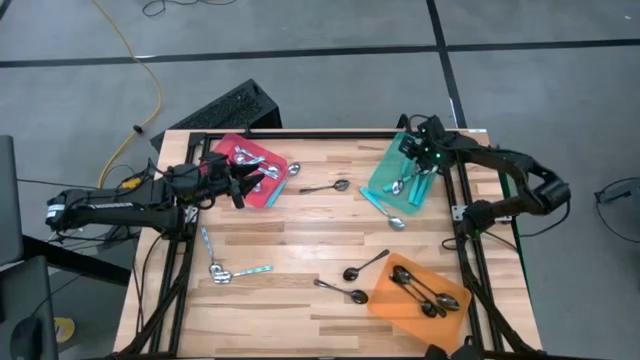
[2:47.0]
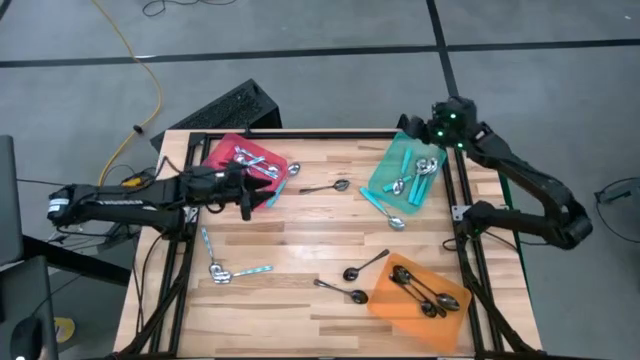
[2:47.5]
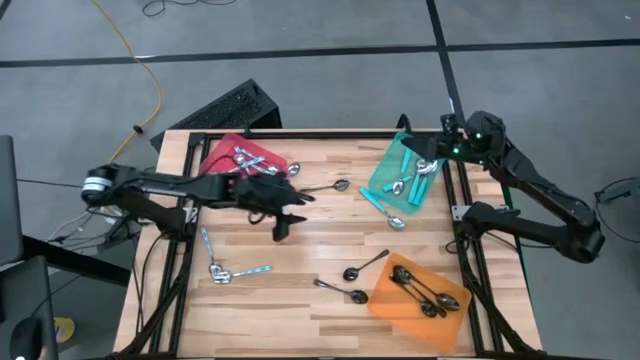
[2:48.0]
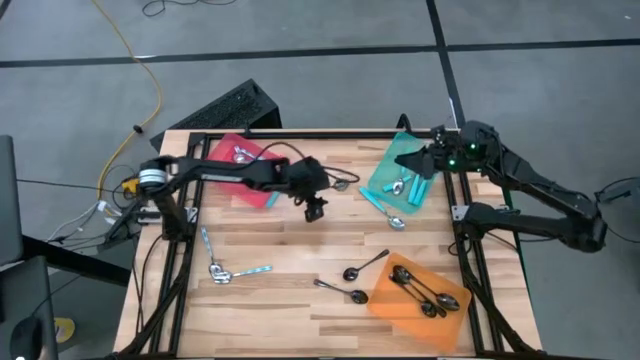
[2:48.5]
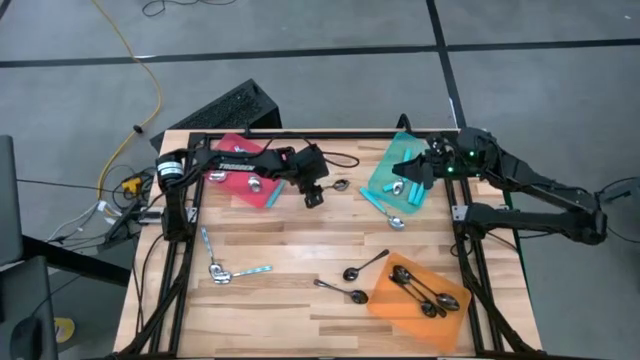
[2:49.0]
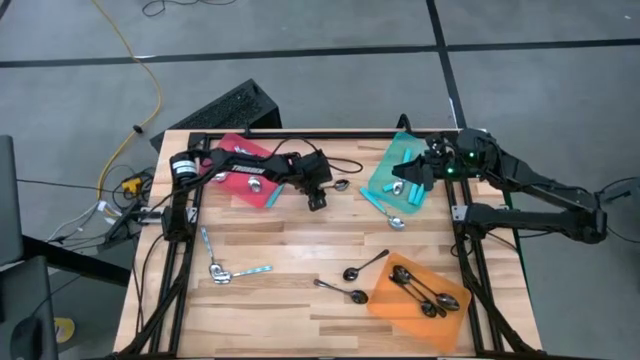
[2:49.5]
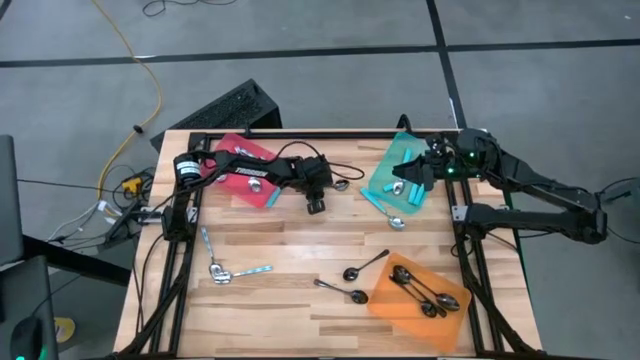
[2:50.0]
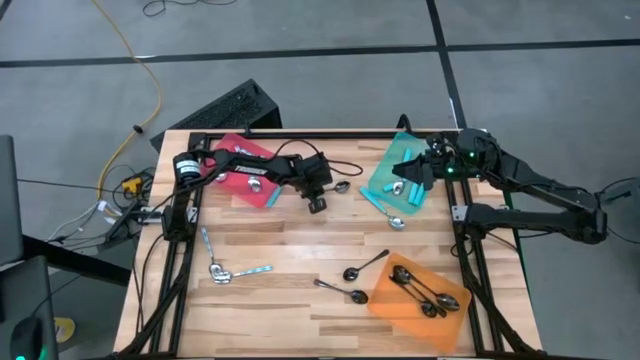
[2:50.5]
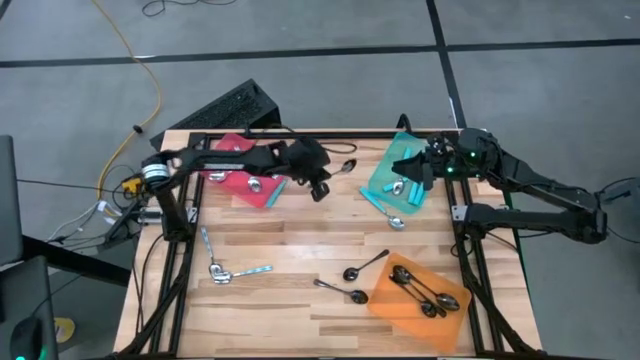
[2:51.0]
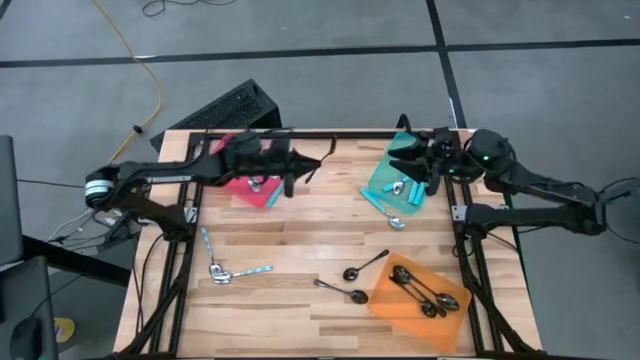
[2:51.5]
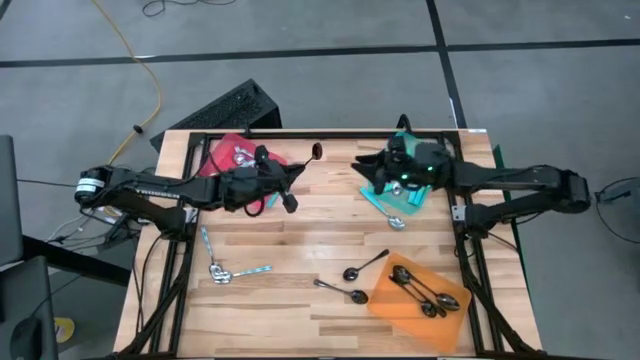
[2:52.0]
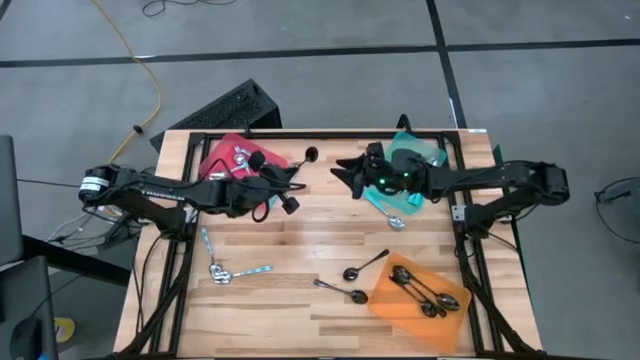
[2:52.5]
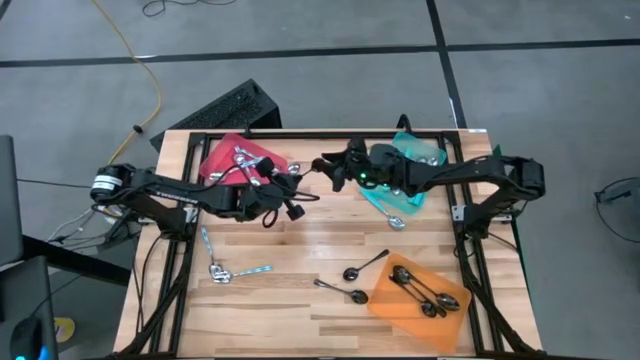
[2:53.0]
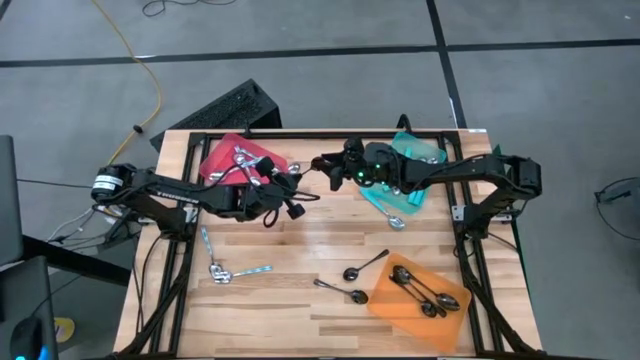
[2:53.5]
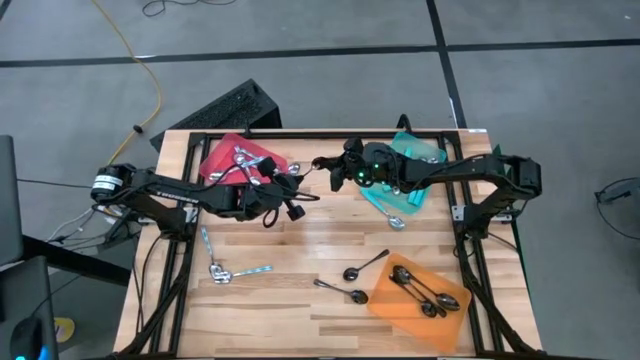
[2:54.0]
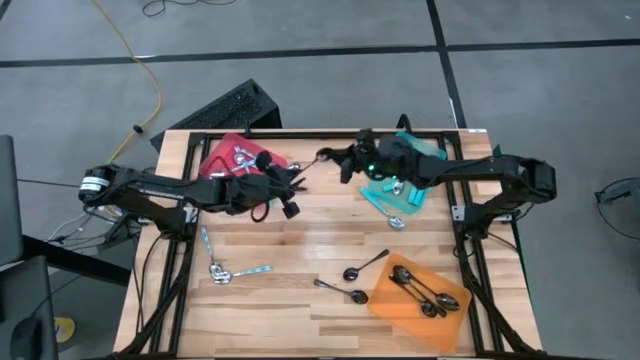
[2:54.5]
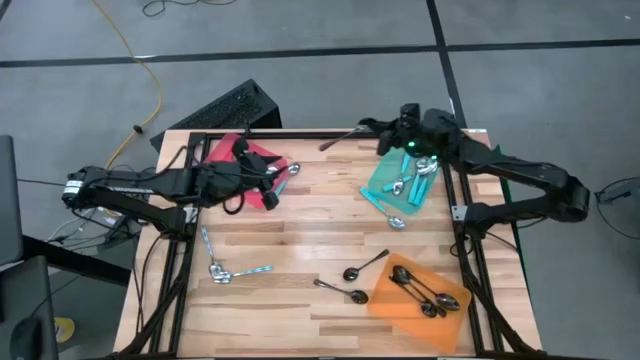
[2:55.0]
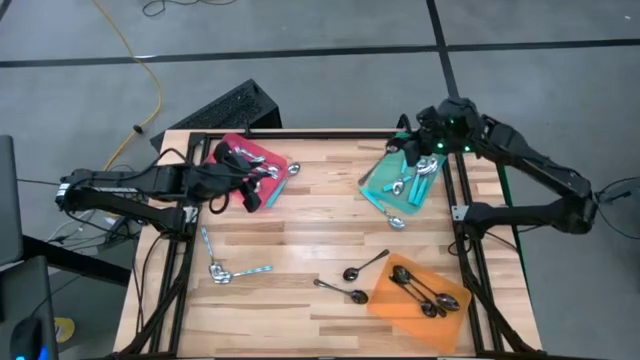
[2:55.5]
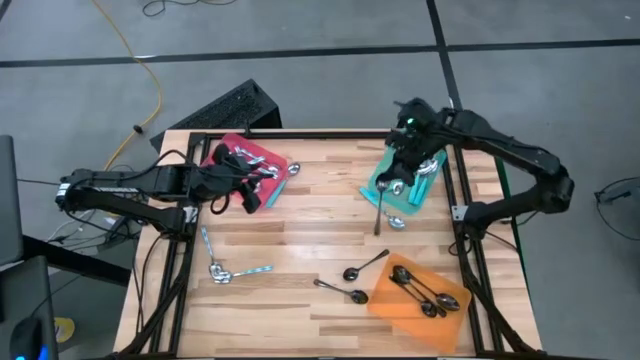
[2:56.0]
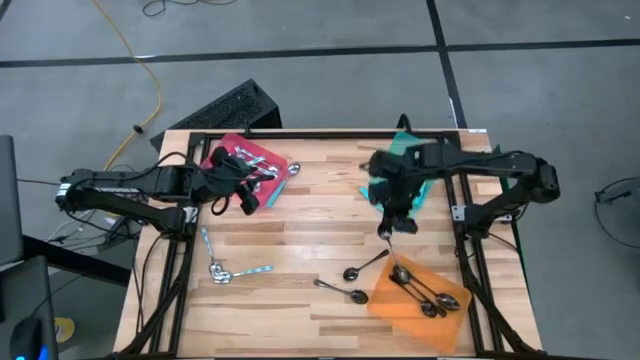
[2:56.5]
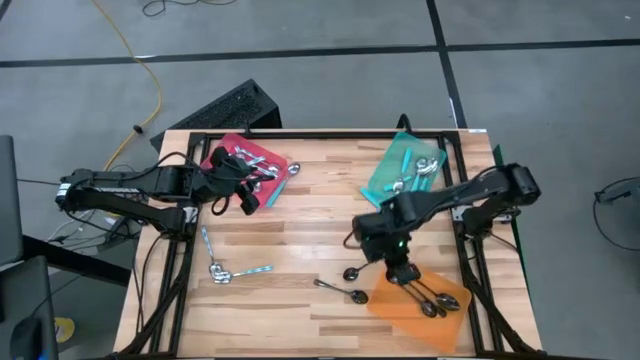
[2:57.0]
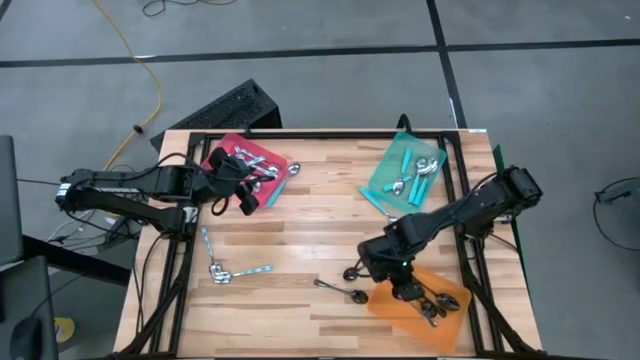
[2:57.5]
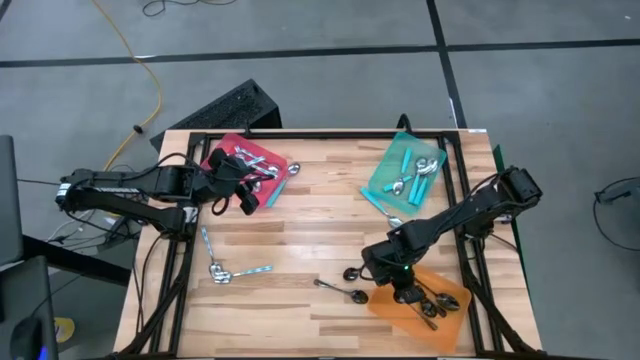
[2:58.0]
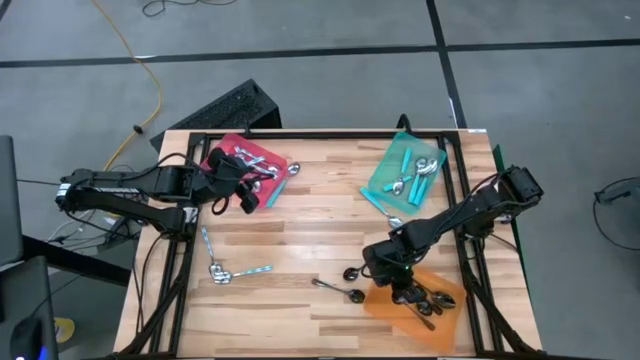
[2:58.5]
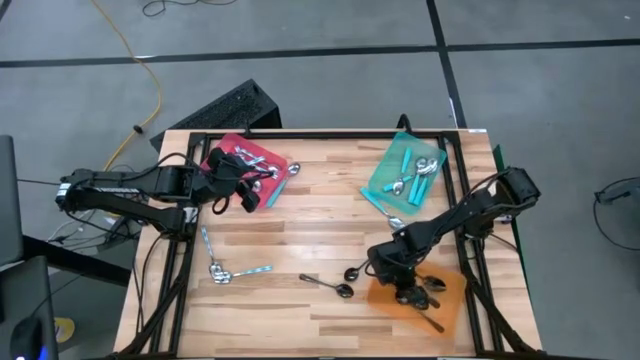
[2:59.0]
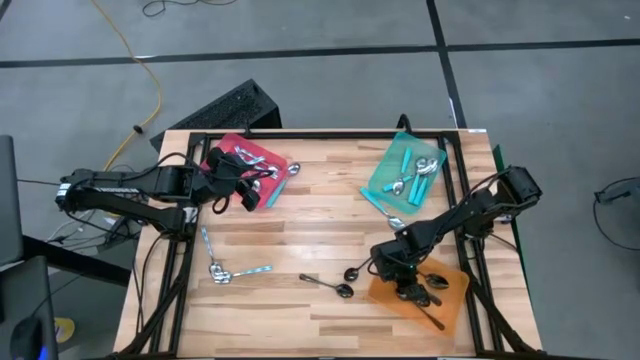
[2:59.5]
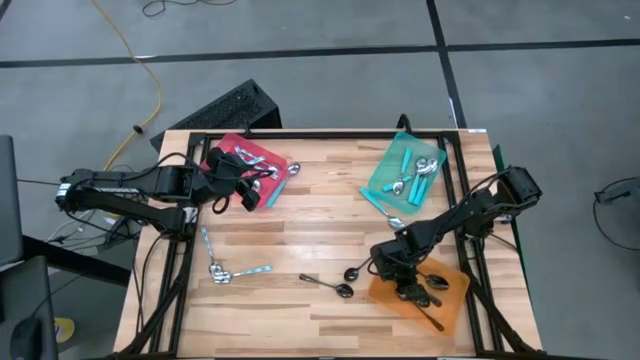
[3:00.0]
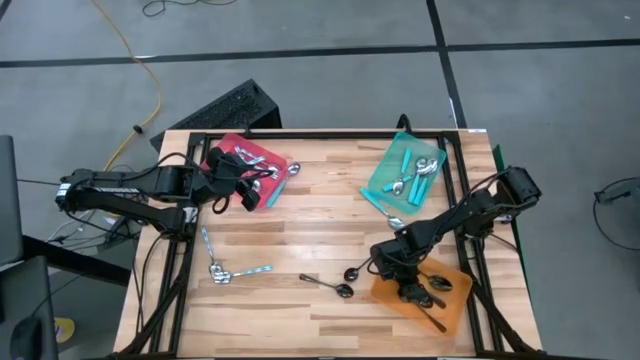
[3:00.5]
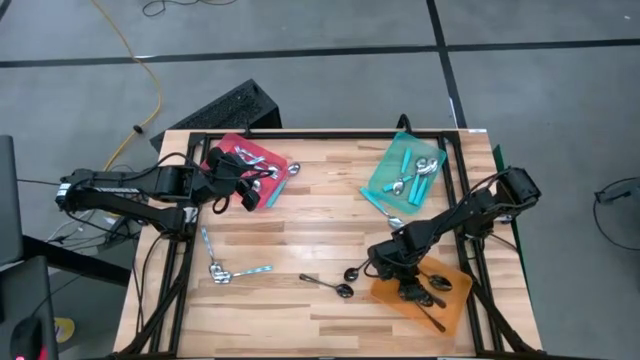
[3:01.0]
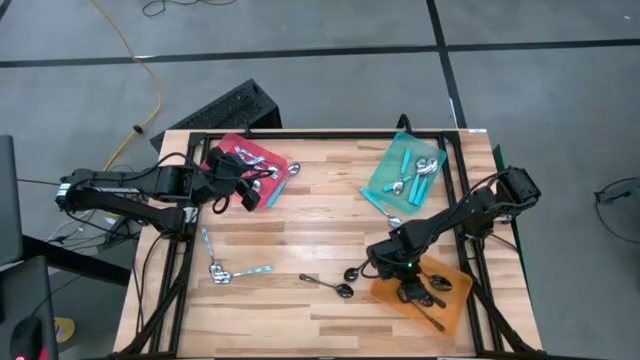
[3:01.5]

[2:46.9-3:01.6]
Task: Sort silverware by color (type)
Put the black spoon into the orange bin

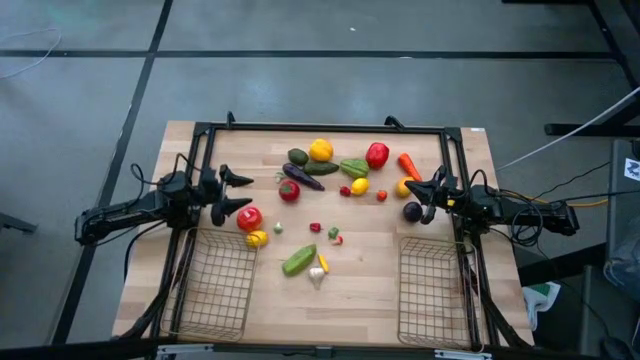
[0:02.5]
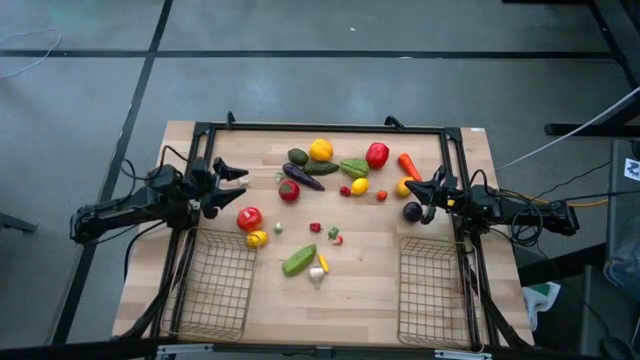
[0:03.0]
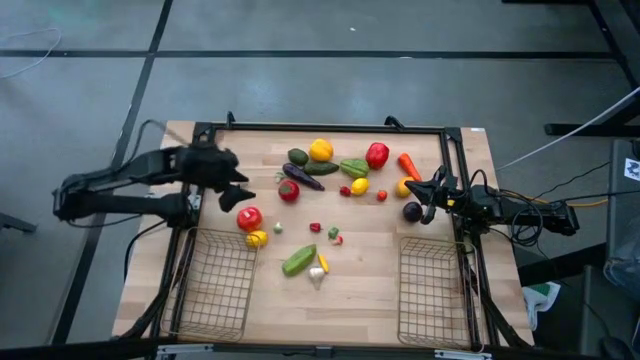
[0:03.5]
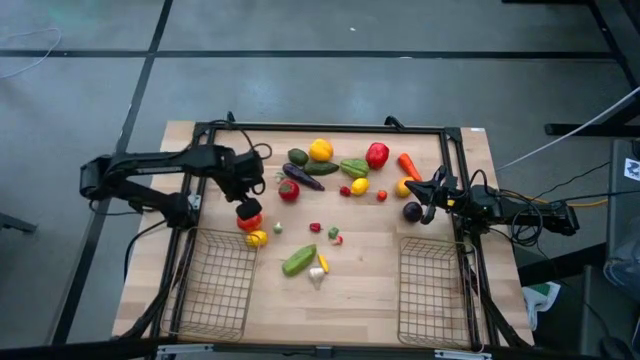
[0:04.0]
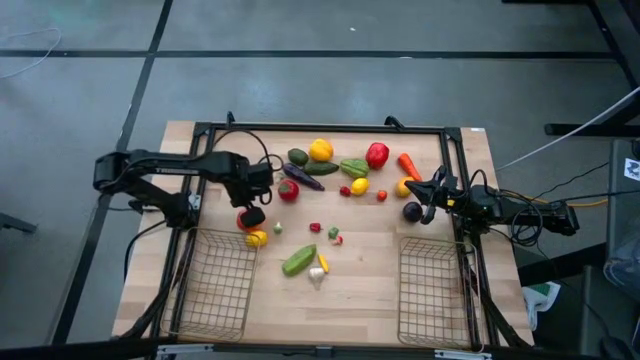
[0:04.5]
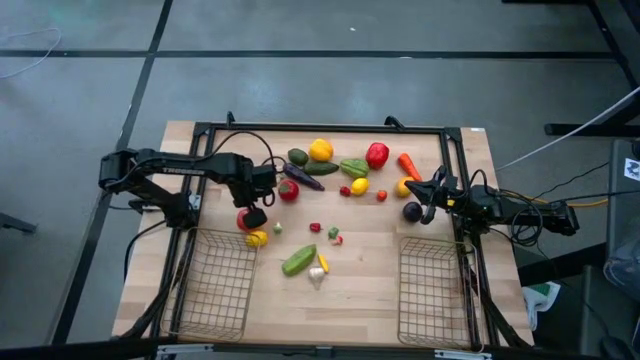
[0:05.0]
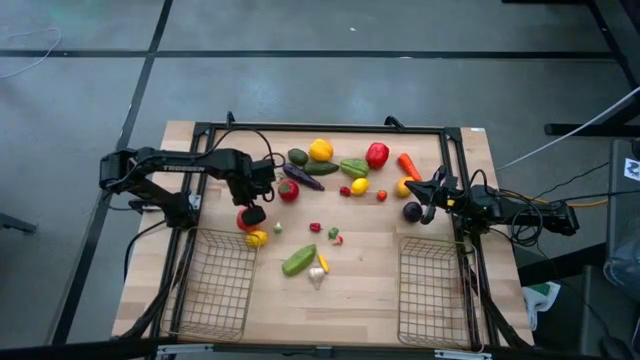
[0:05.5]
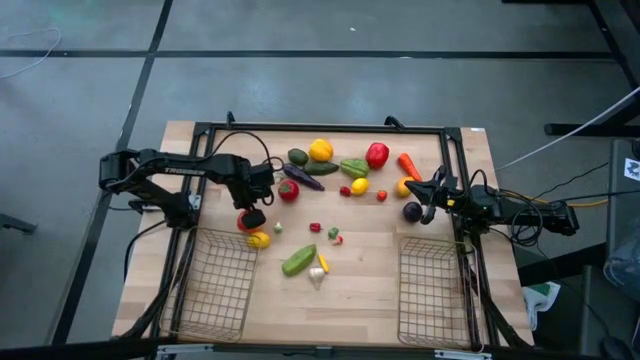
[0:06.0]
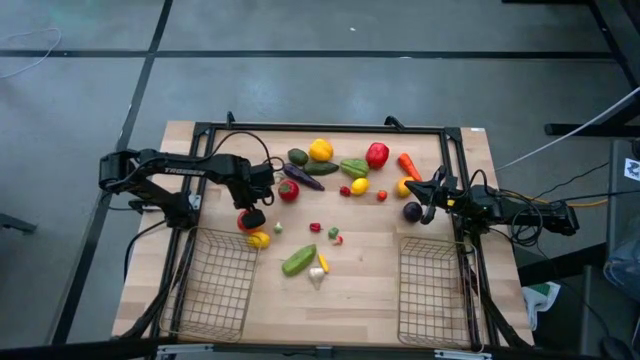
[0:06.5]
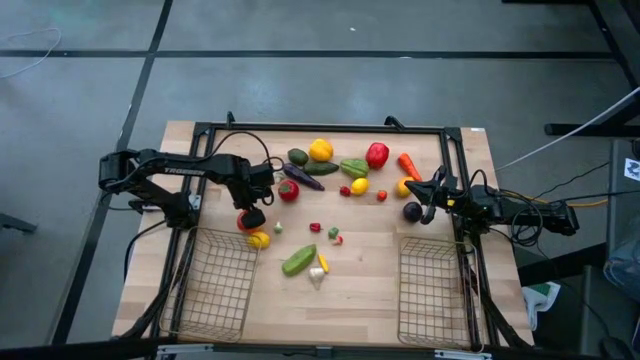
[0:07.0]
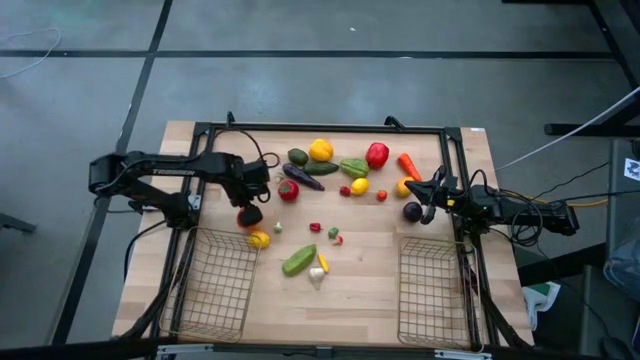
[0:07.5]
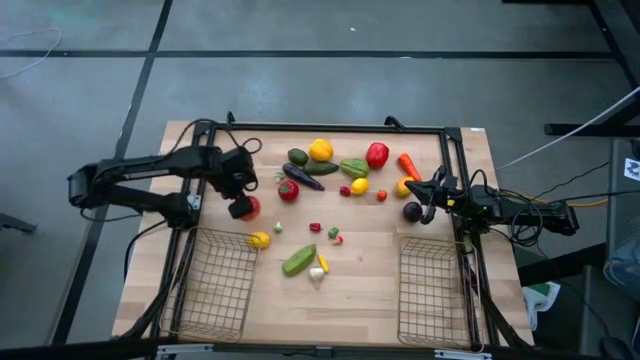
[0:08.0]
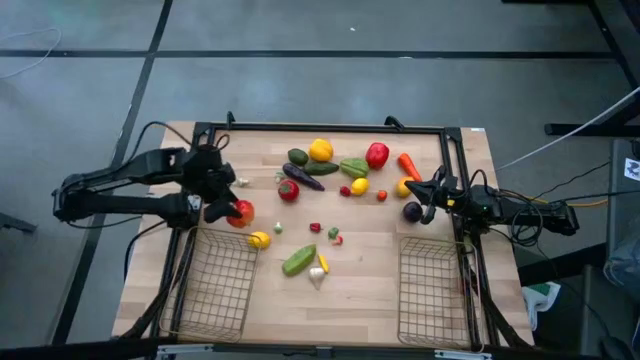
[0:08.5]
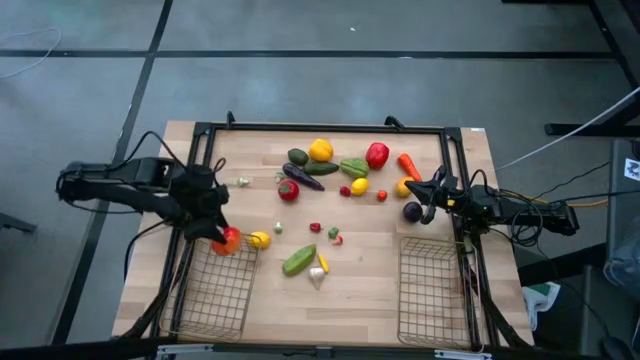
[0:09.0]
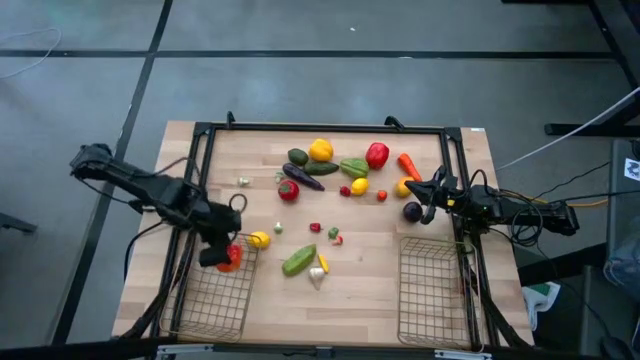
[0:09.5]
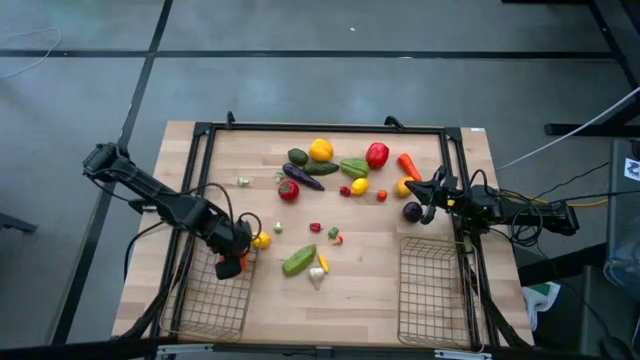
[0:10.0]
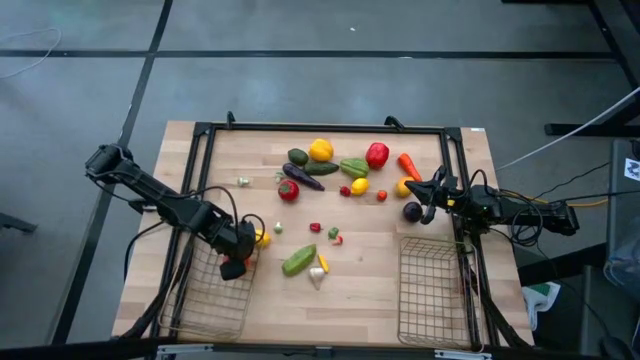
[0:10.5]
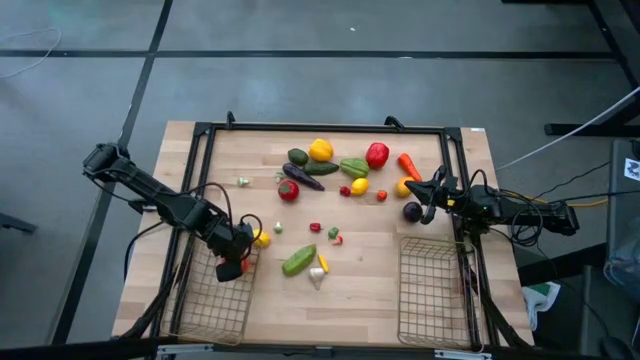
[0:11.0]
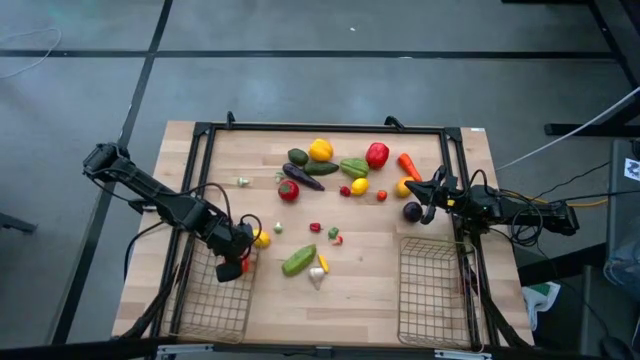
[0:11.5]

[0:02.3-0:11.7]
Task: Sort produce into baskets
Put the orange tomato into the left wire basket
